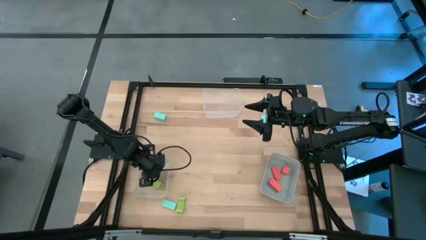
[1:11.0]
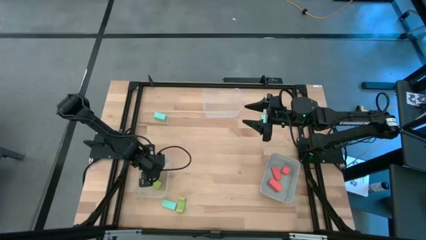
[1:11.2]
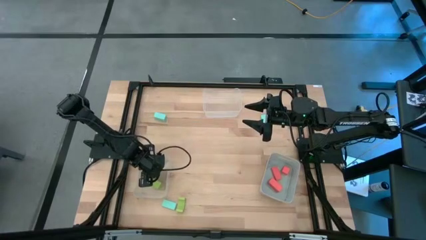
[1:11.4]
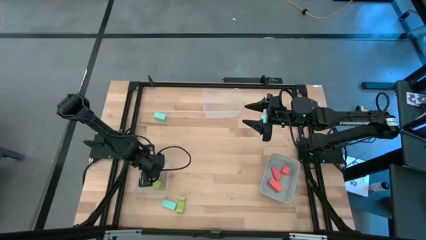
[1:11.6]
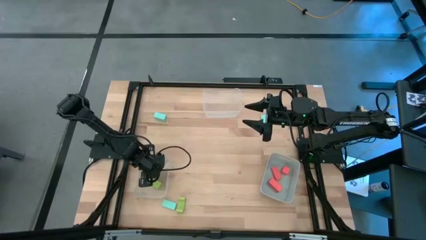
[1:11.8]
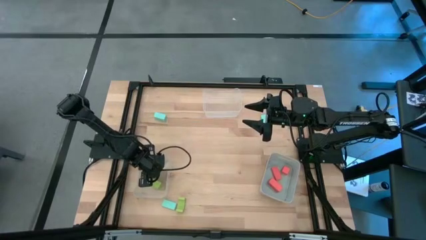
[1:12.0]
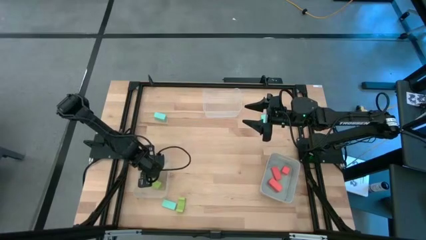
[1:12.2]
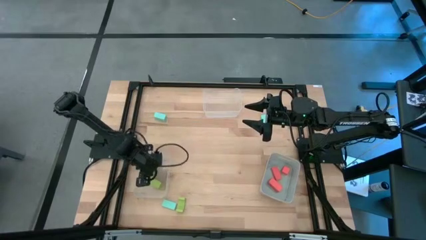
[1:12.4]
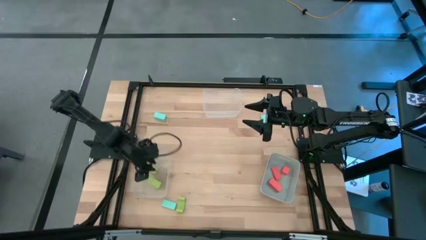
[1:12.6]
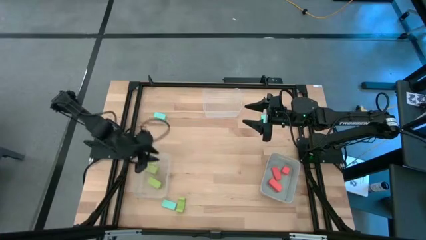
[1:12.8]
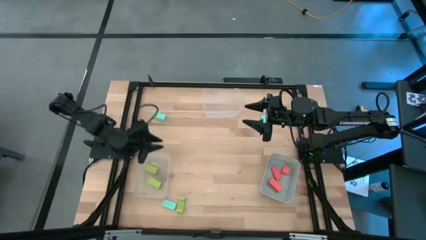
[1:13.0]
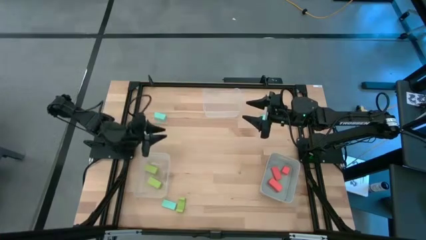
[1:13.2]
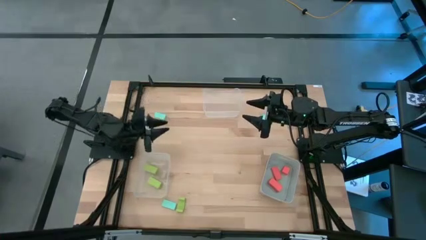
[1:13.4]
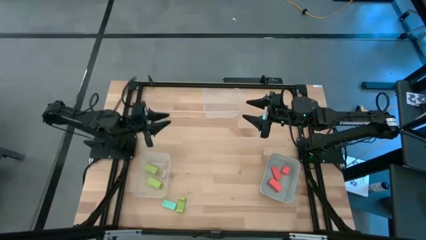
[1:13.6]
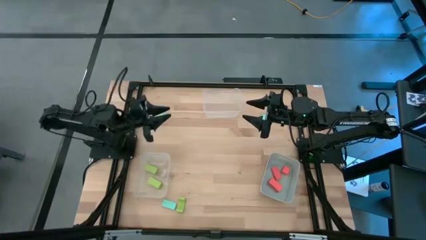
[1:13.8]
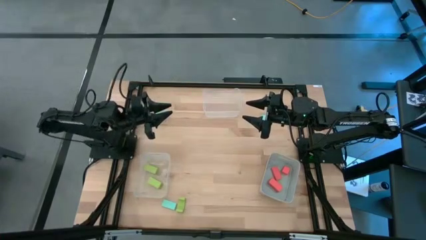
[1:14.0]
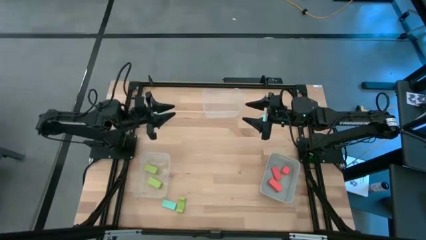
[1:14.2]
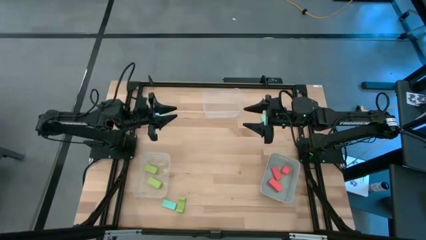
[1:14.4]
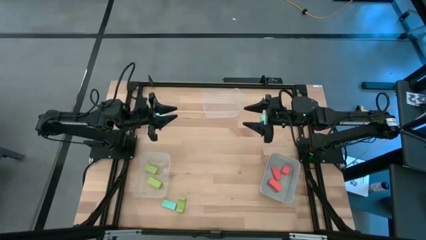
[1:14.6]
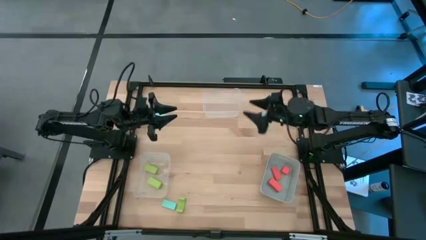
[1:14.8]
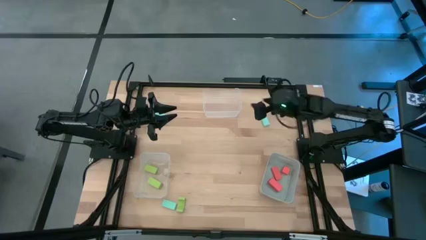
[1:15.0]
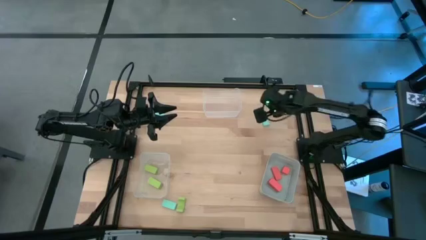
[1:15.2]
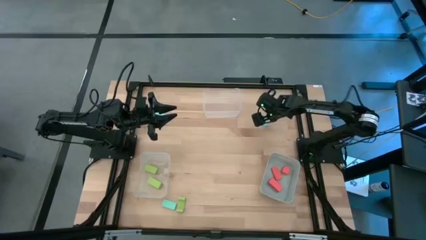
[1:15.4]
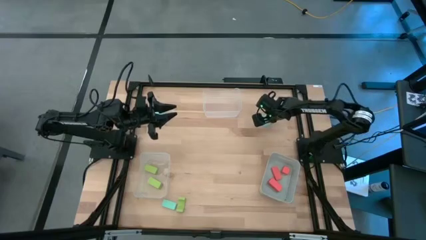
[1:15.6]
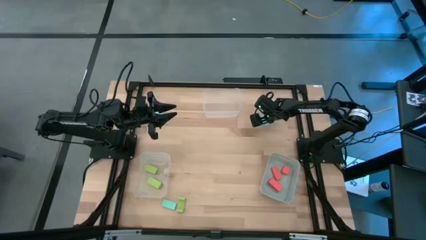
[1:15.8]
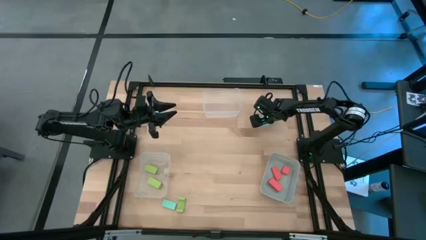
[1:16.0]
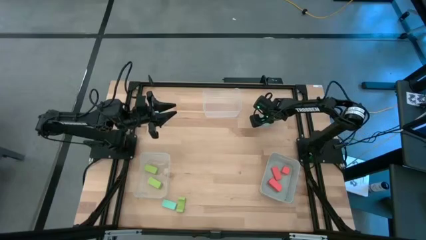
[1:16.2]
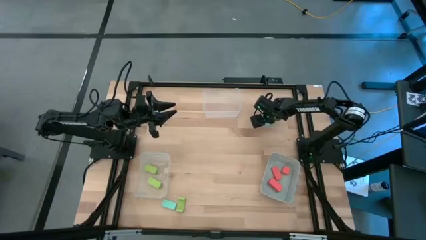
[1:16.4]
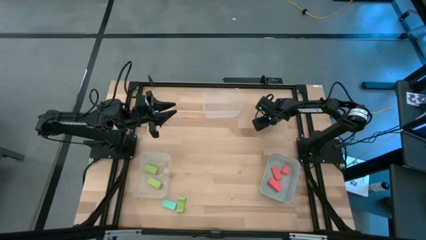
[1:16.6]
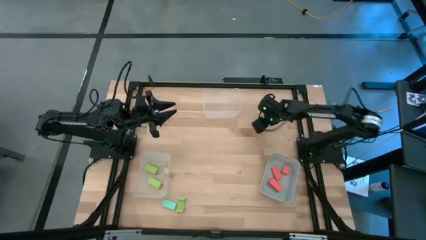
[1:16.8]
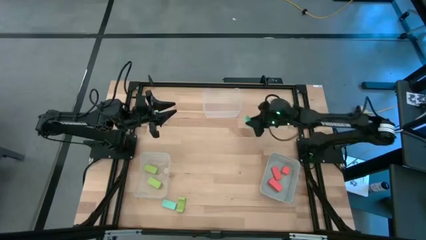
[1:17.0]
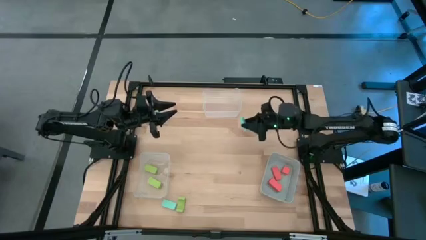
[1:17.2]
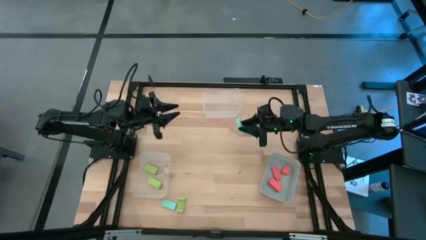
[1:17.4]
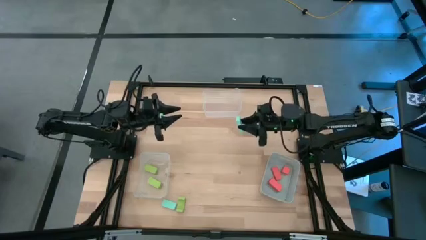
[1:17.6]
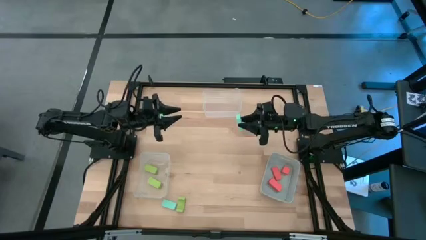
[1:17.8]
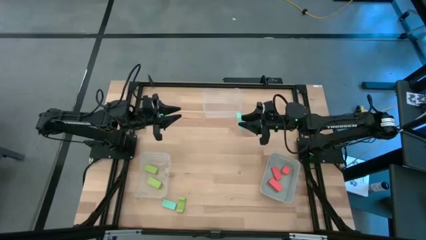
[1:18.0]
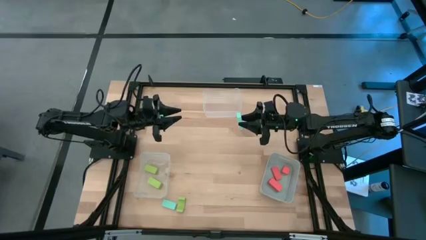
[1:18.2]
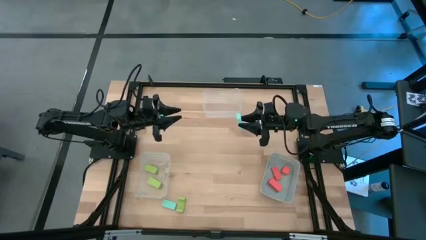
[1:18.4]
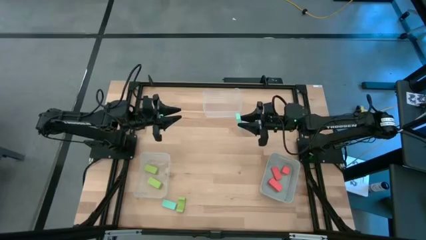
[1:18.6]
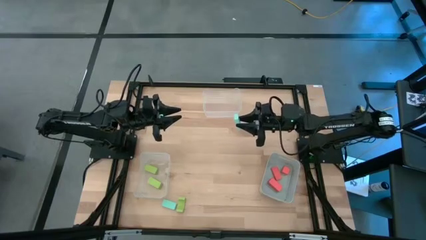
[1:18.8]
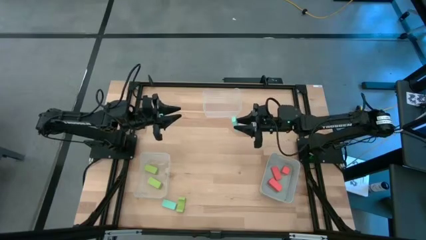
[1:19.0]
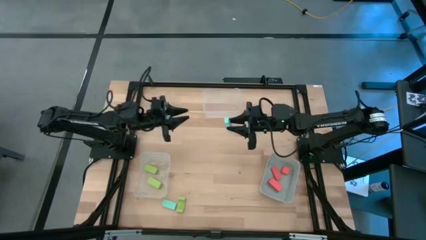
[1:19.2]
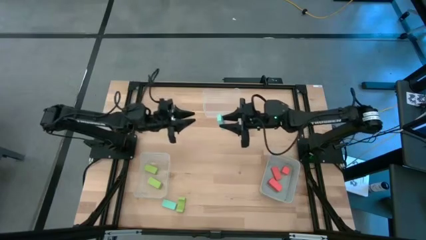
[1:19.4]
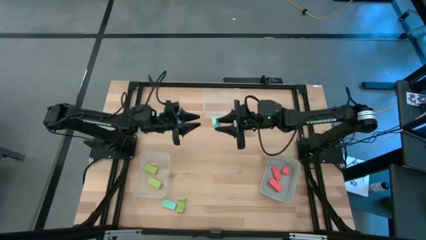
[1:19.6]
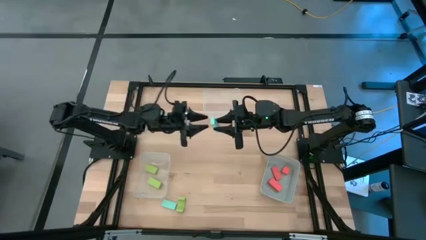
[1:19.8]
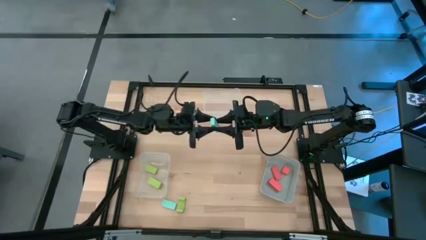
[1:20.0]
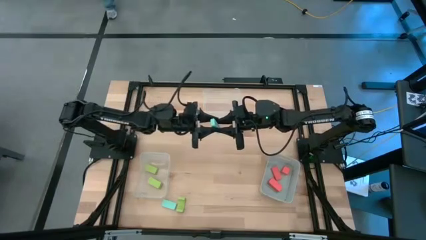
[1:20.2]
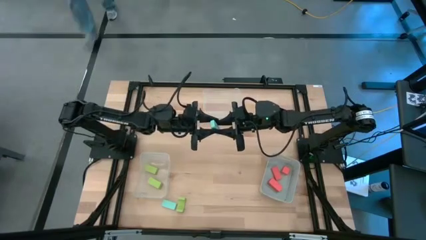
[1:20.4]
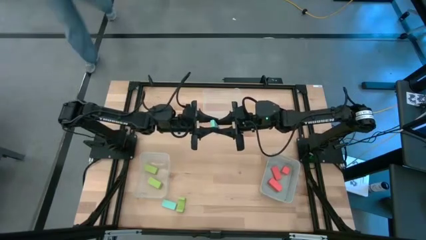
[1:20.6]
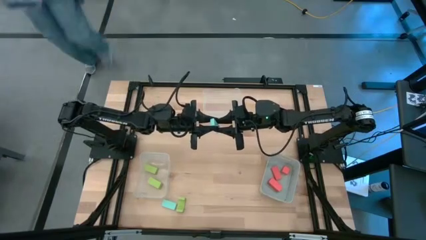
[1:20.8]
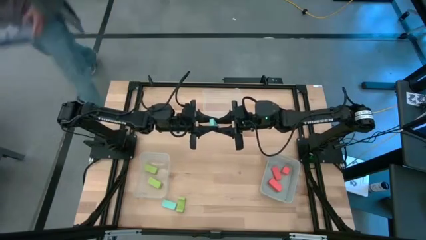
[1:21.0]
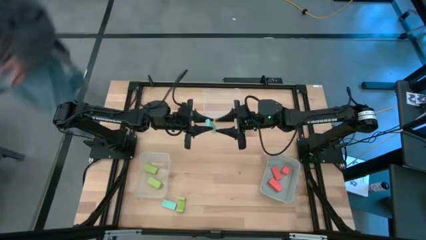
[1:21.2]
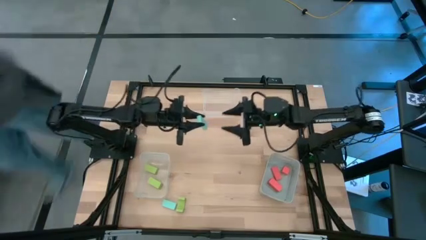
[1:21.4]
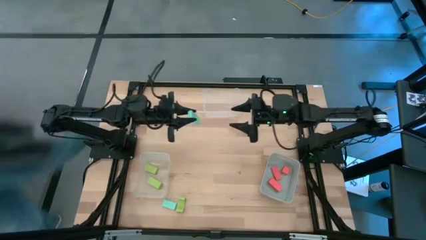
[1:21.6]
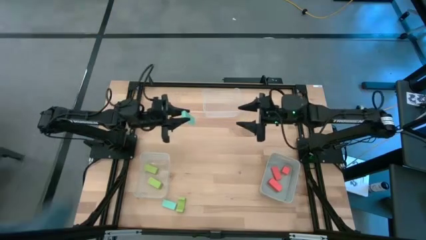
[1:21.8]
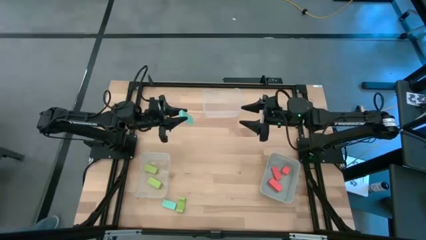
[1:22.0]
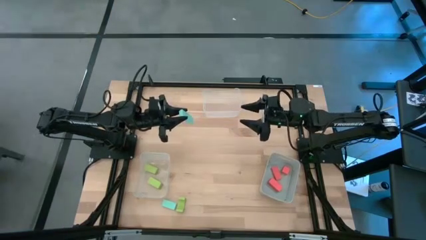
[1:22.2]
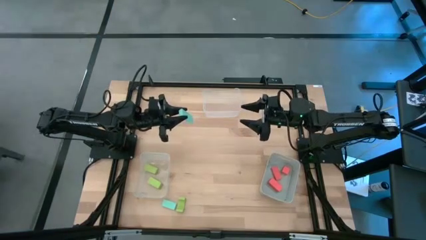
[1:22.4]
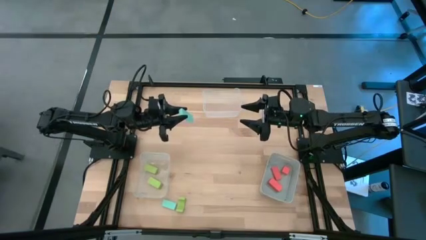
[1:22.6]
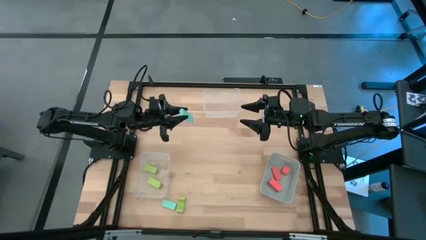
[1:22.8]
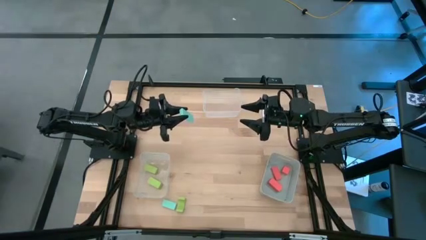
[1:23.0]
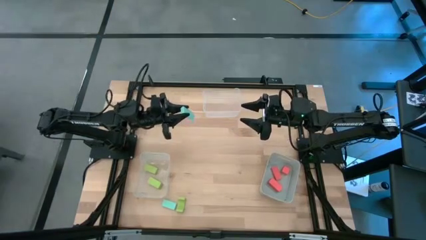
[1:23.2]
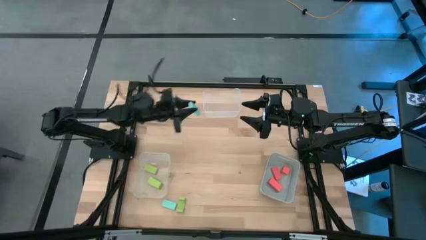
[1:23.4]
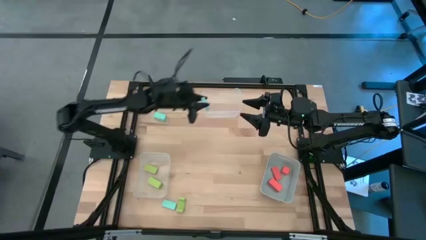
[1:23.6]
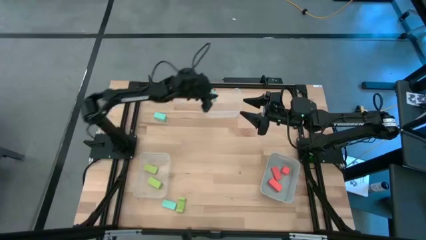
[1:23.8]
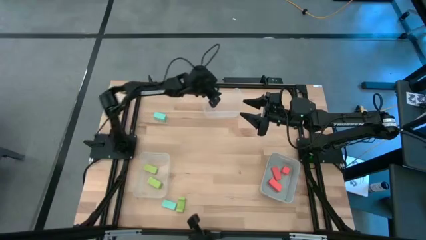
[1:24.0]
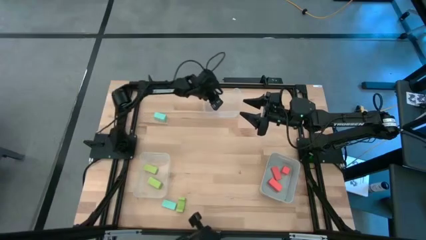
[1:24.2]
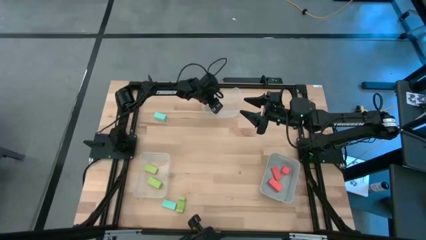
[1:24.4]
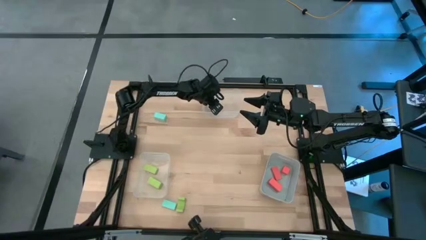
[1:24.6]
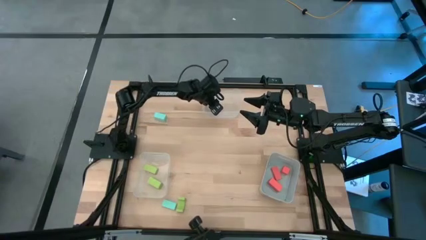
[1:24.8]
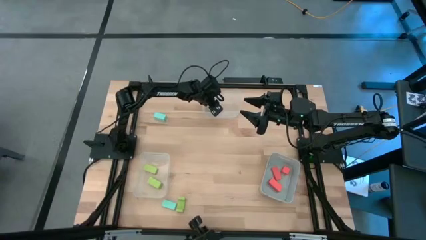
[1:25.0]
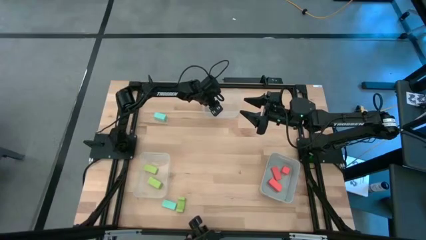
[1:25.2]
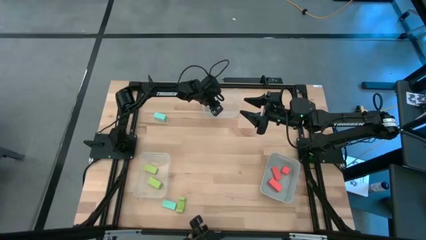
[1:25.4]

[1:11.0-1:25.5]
Task: Sort & place blocks by color
Put the top right blue block into the top transparent bin
